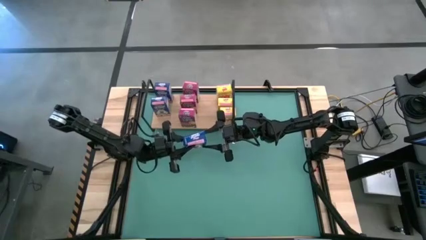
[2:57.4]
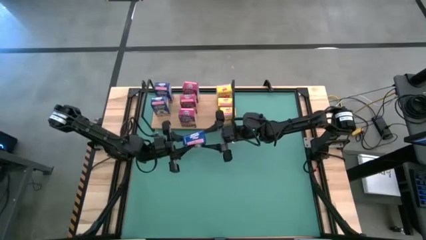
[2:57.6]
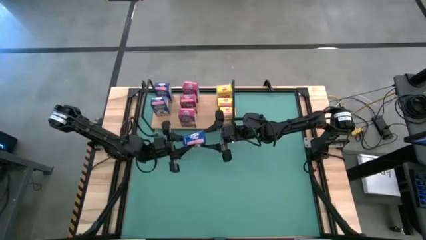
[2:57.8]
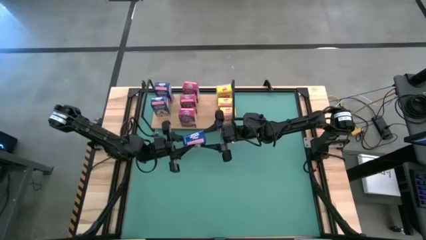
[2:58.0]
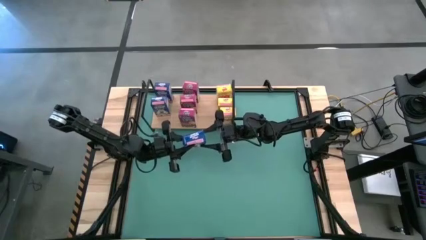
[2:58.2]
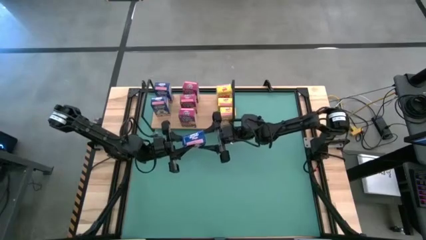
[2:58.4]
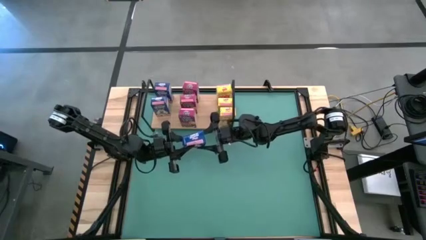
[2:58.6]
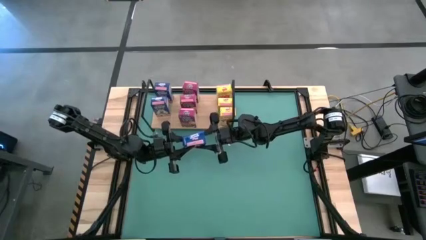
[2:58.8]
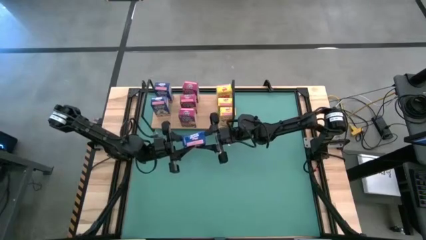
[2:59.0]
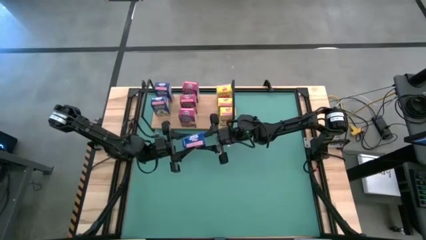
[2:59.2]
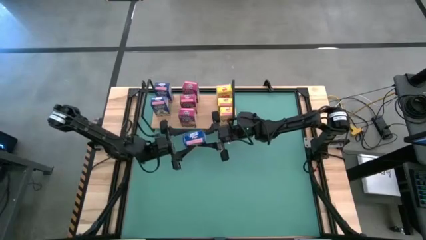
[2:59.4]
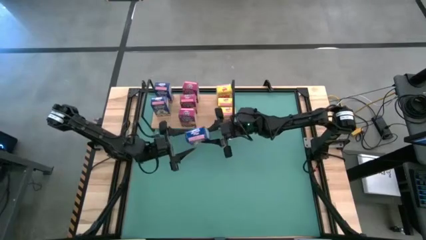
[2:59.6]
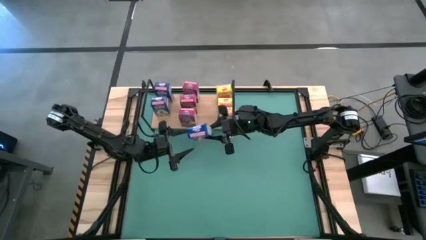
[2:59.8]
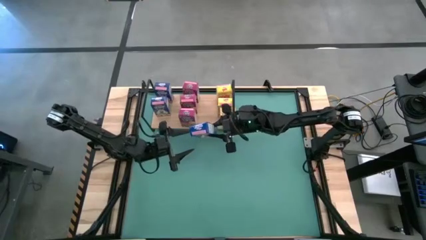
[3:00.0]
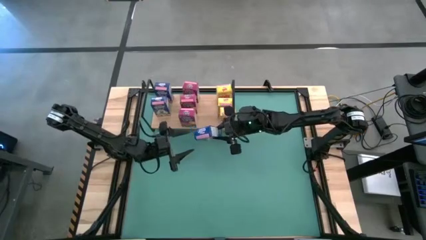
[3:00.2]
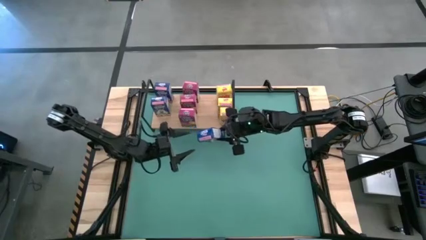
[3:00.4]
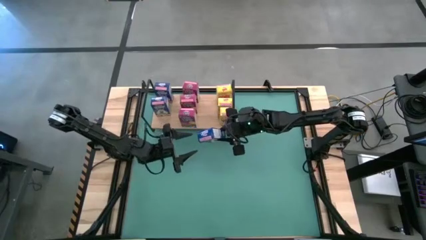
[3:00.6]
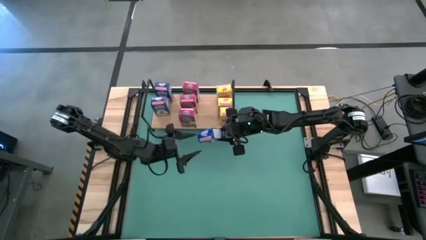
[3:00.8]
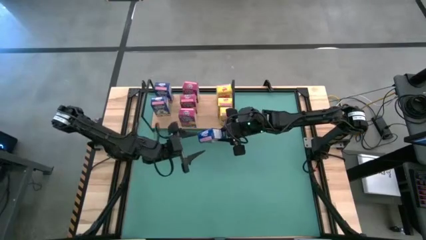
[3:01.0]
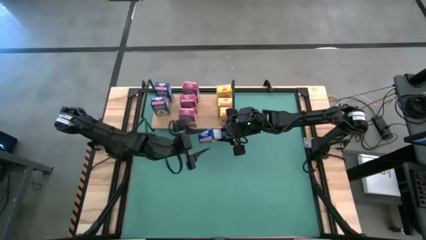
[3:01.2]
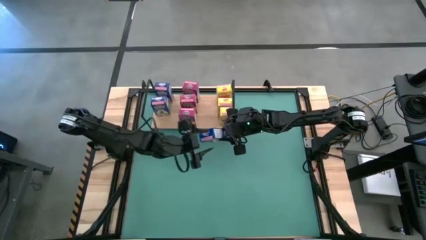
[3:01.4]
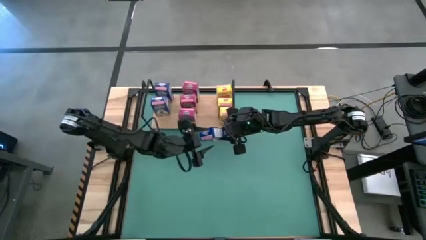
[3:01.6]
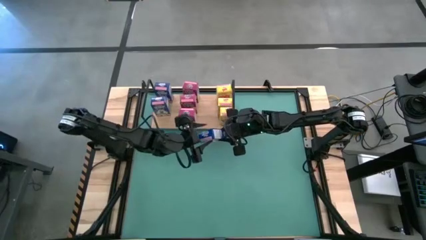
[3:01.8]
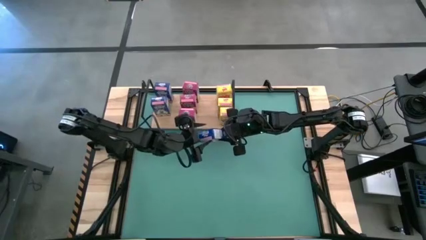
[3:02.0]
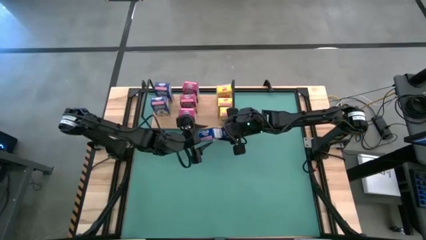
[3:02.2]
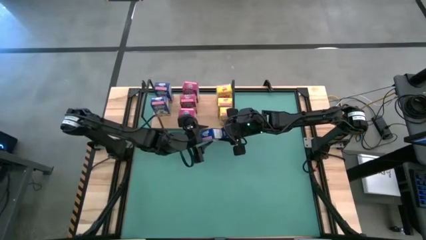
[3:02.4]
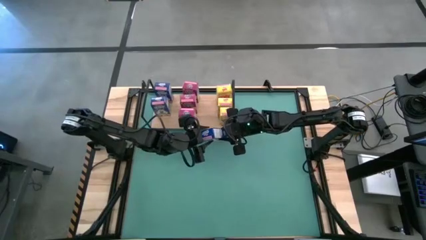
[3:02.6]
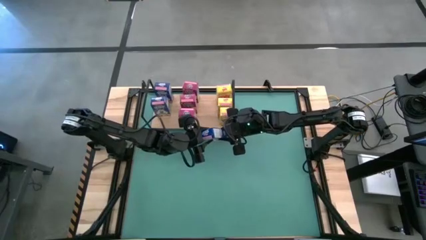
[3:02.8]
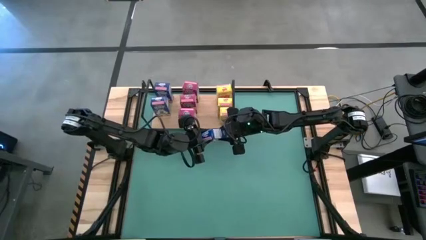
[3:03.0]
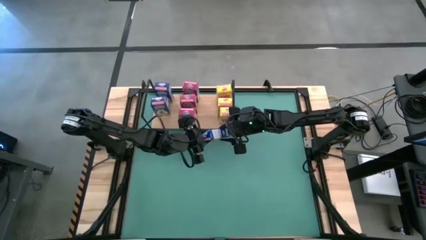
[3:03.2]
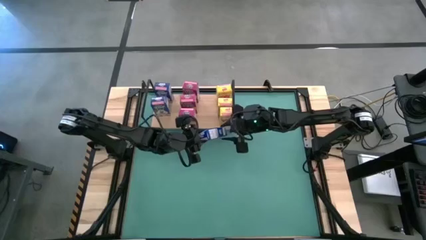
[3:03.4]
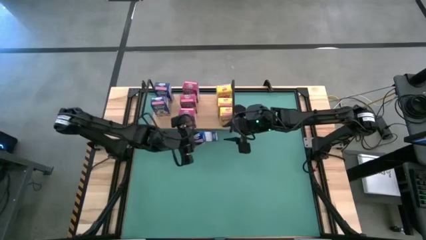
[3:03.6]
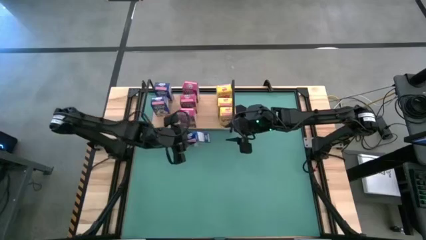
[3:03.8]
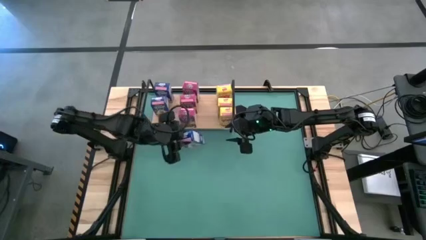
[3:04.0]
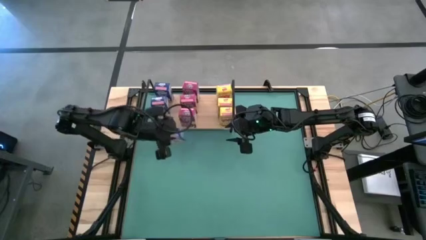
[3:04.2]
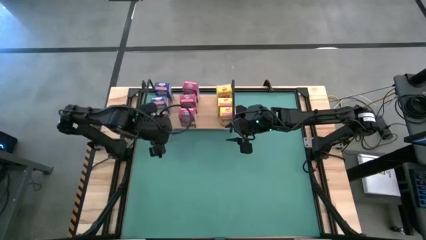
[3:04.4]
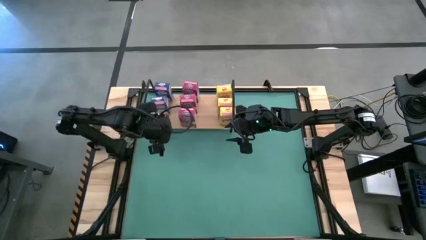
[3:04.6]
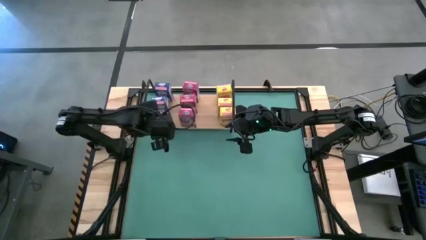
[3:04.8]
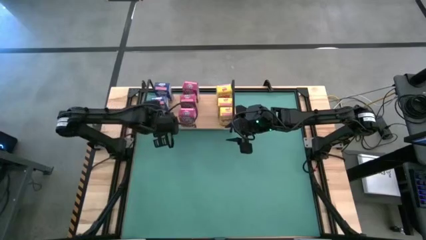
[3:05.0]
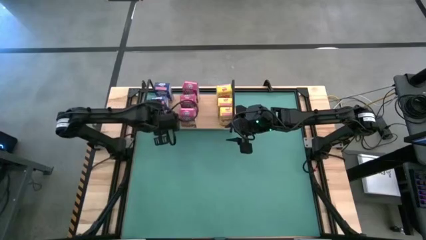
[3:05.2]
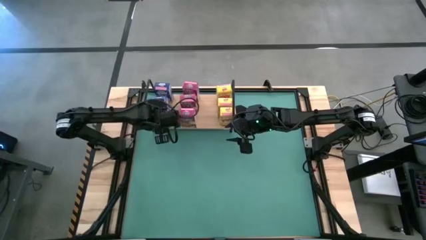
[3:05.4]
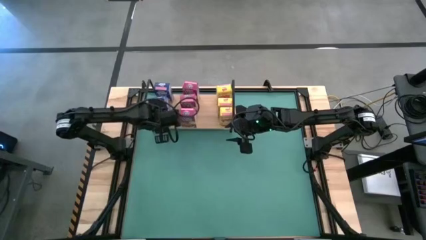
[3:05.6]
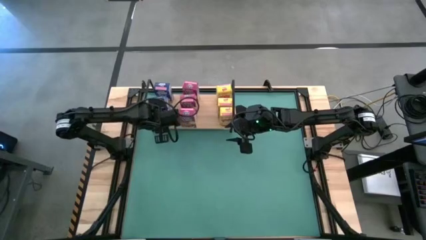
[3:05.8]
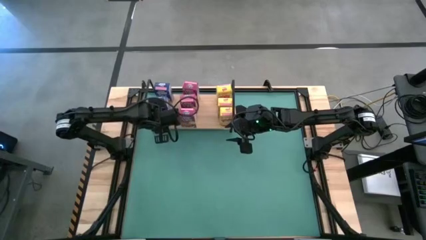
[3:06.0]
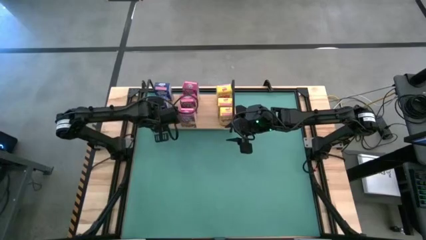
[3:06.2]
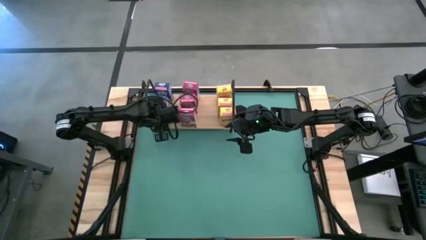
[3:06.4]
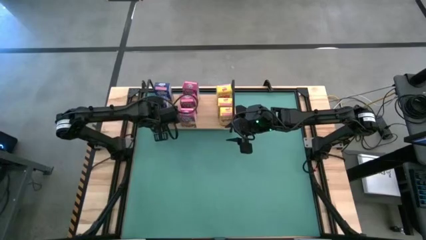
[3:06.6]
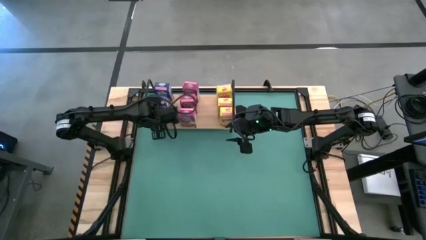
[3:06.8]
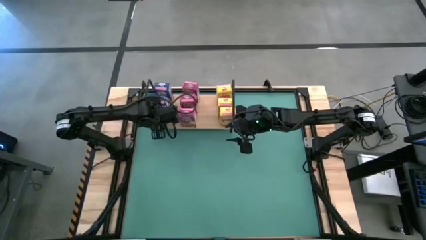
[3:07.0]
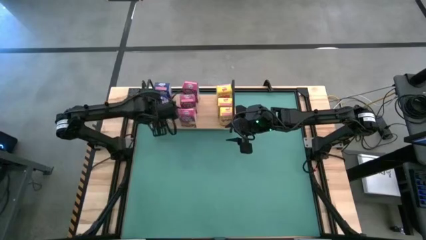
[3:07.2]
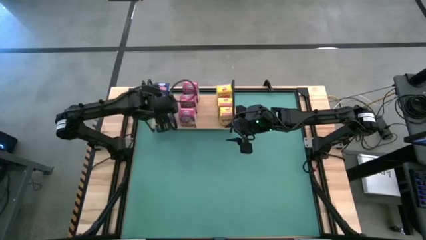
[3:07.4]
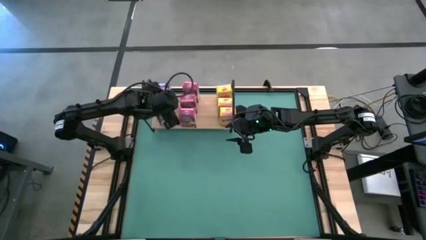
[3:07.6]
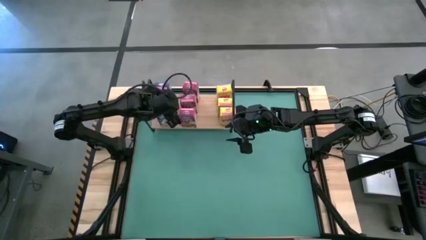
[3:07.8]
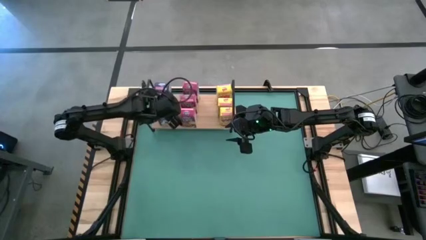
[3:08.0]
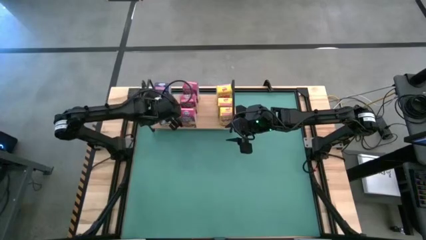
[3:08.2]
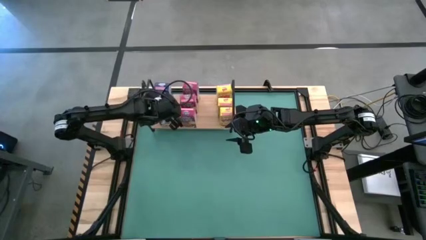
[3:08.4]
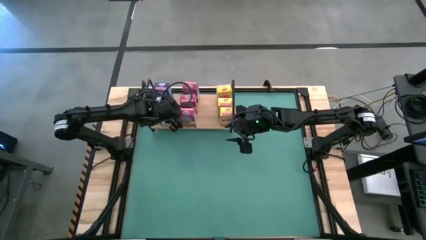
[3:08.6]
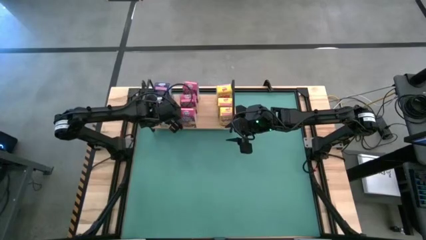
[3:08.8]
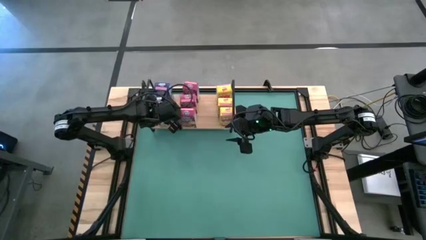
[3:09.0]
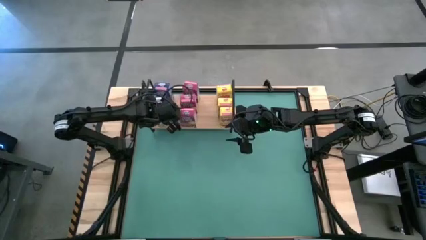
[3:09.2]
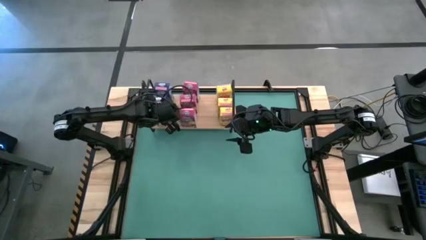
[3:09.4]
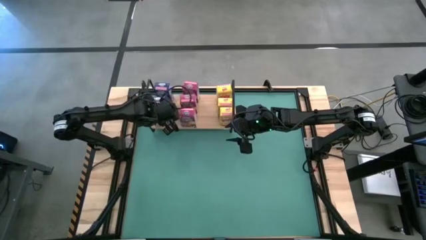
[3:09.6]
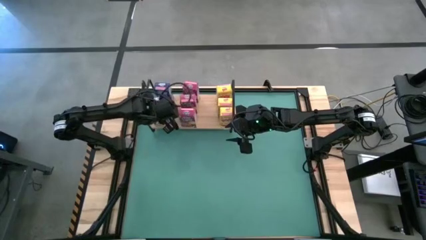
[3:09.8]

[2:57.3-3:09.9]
Task: Stack cereal on shelf
Put the blue cereal box on the shelf

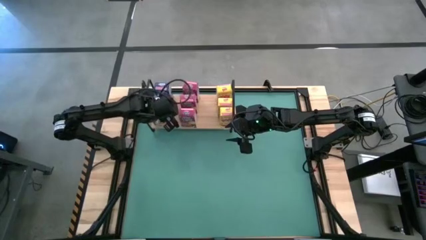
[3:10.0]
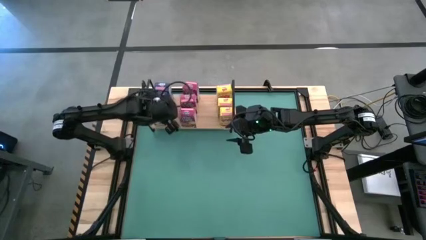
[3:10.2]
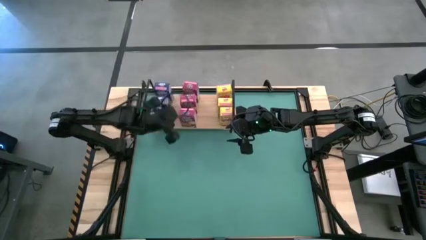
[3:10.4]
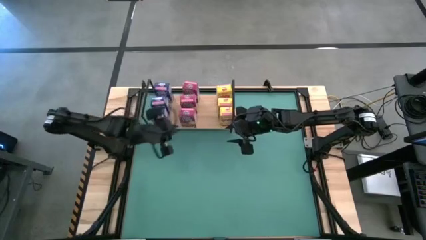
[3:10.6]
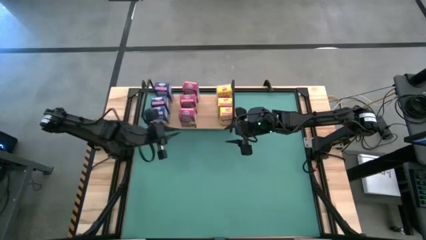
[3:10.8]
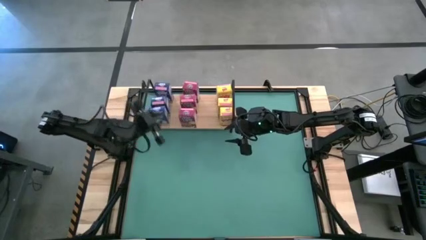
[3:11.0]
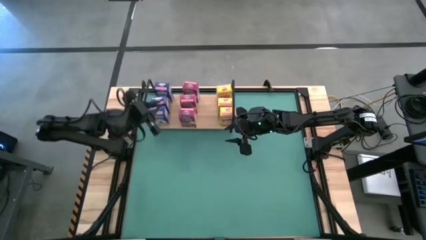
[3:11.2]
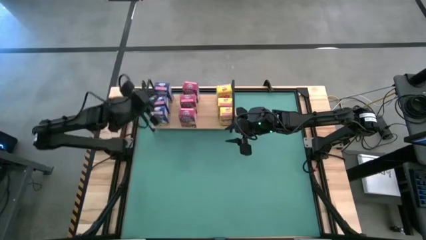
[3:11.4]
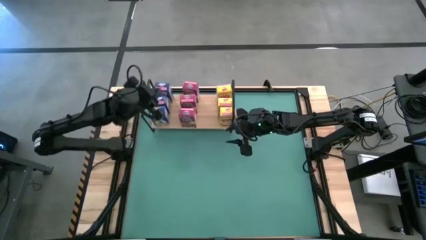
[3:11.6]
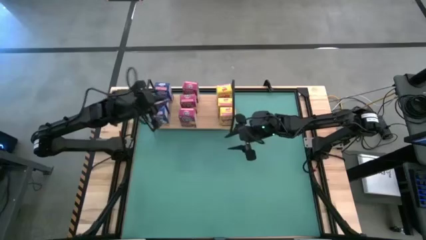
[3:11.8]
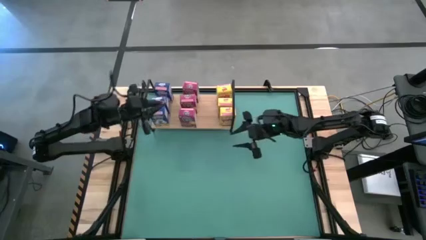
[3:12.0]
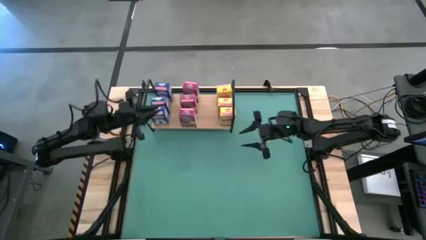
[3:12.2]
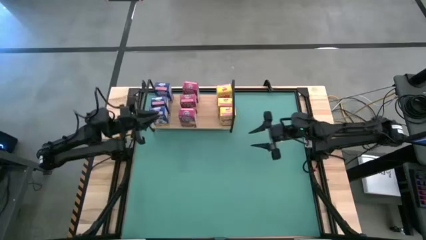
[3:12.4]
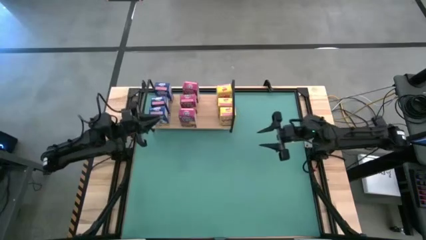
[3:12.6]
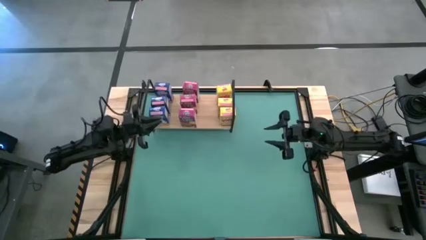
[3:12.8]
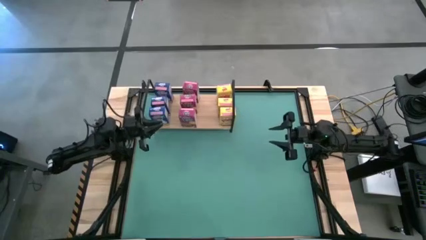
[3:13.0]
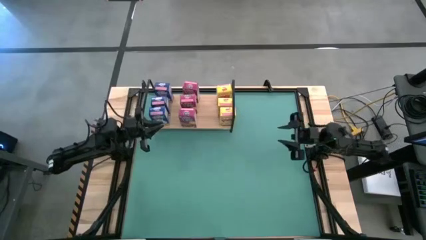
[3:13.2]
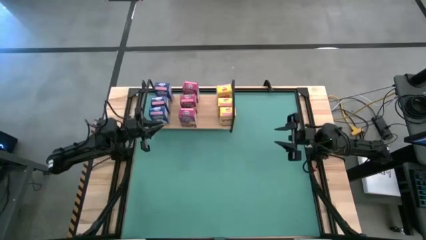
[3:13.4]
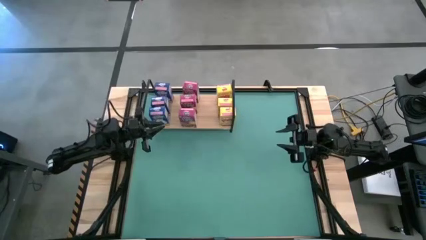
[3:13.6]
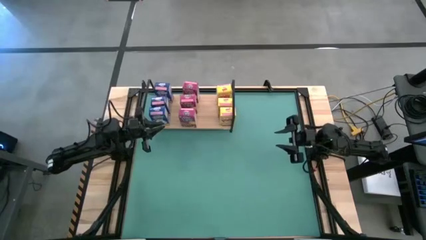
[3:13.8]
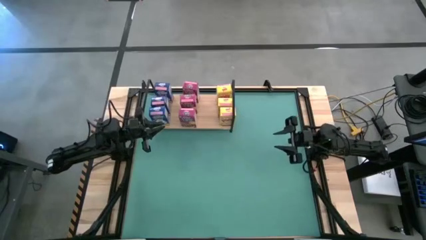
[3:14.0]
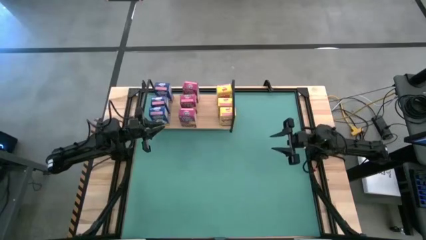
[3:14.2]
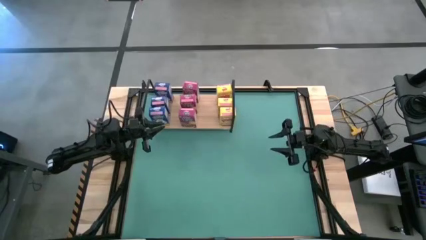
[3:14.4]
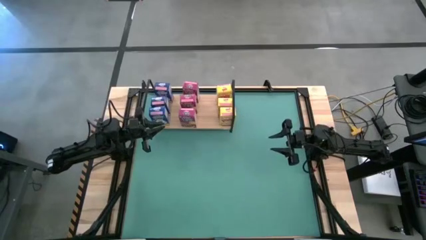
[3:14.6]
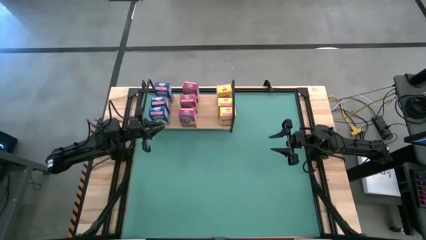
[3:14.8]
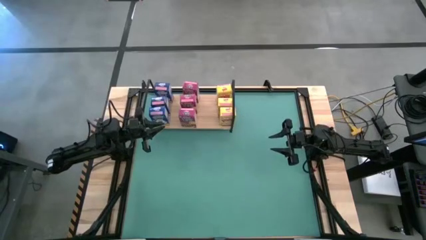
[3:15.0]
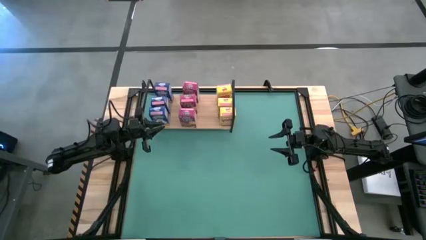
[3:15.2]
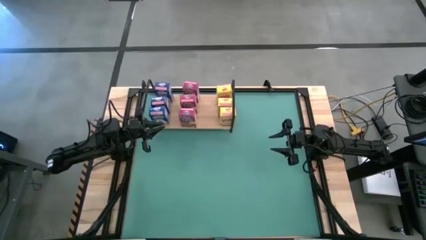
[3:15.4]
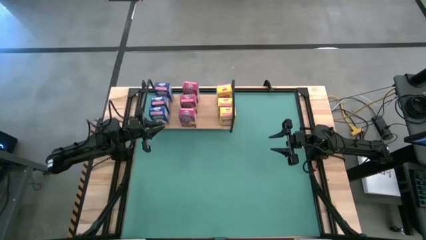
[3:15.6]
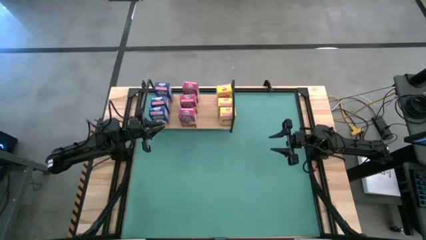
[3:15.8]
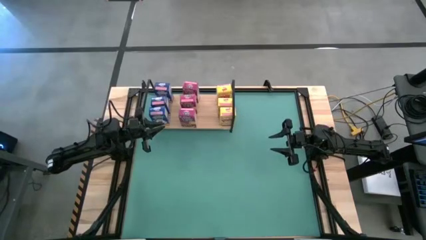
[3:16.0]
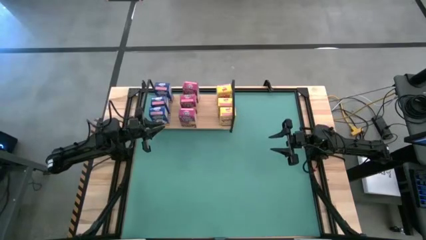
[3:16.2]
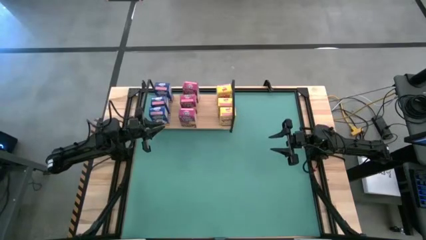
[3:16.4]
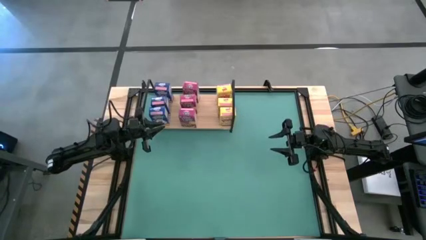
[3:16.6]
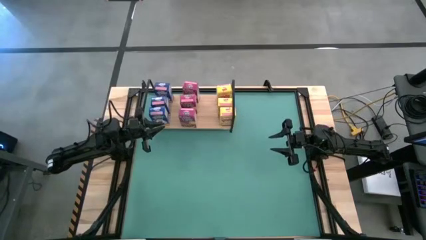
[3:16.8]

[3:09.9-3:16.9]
Return to Home Position
